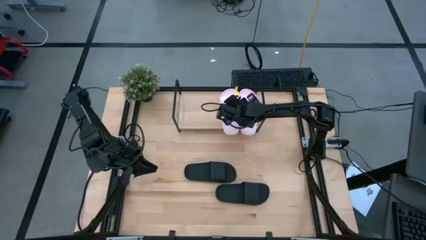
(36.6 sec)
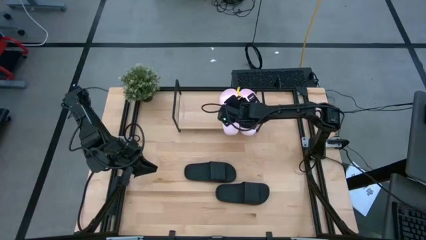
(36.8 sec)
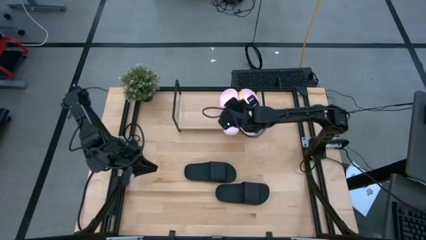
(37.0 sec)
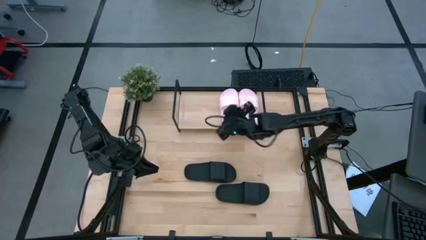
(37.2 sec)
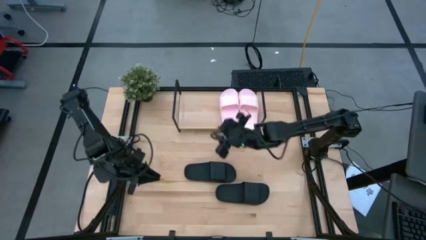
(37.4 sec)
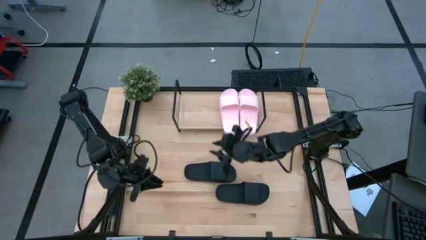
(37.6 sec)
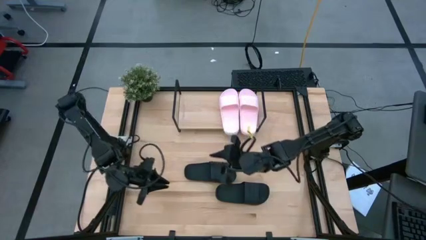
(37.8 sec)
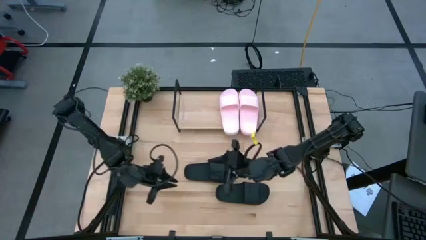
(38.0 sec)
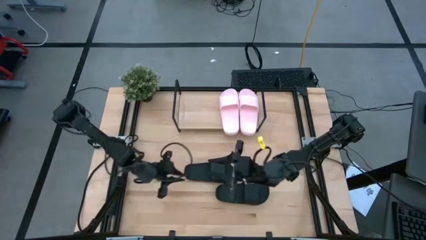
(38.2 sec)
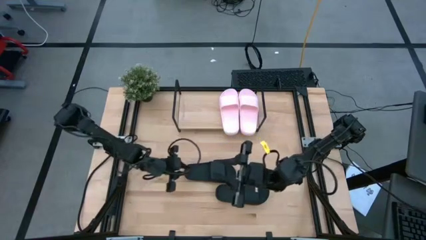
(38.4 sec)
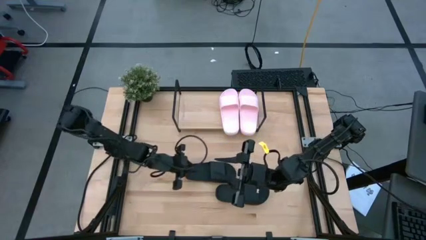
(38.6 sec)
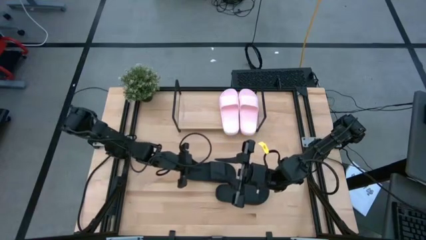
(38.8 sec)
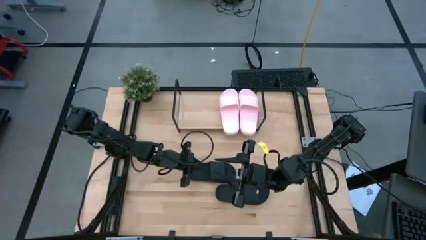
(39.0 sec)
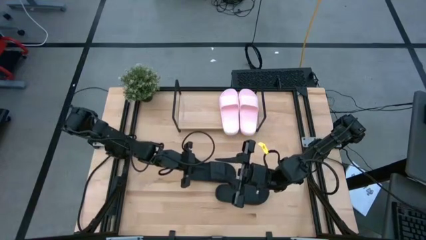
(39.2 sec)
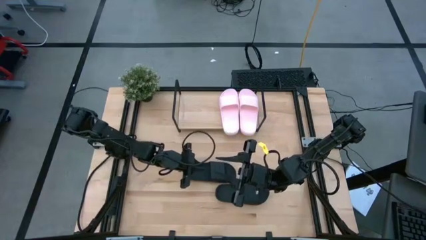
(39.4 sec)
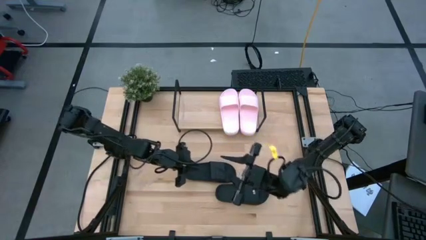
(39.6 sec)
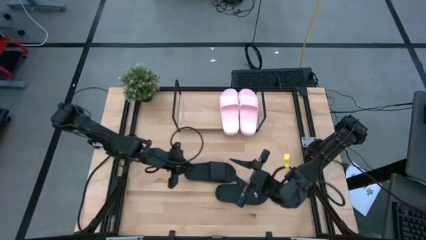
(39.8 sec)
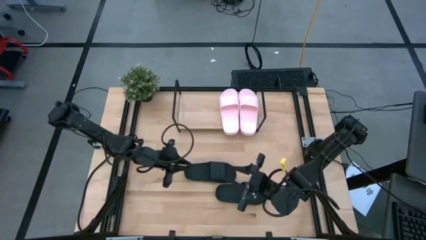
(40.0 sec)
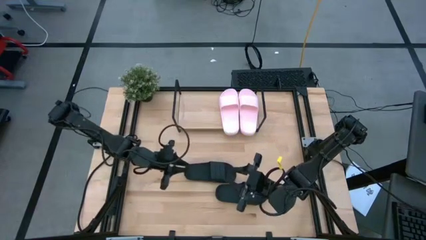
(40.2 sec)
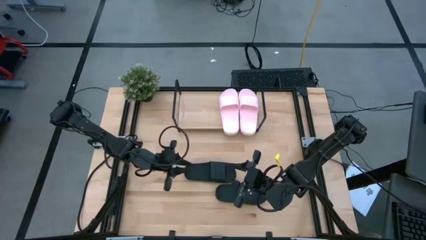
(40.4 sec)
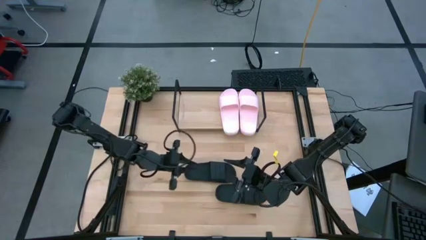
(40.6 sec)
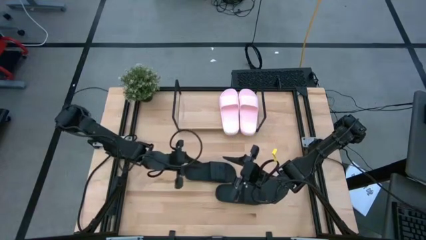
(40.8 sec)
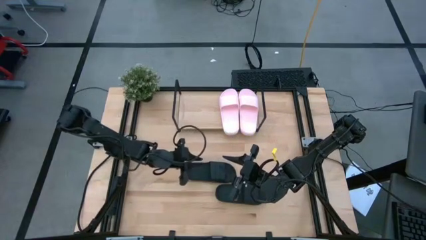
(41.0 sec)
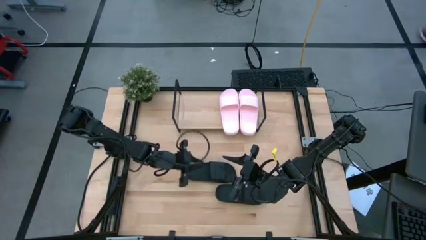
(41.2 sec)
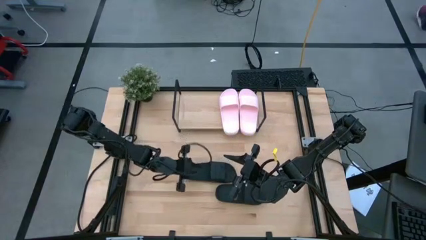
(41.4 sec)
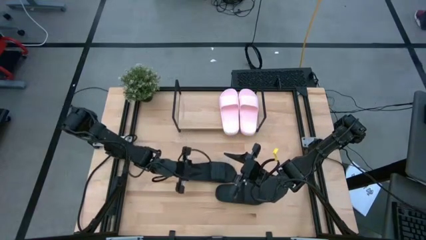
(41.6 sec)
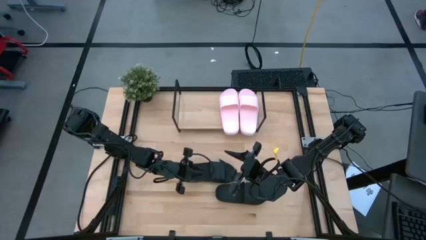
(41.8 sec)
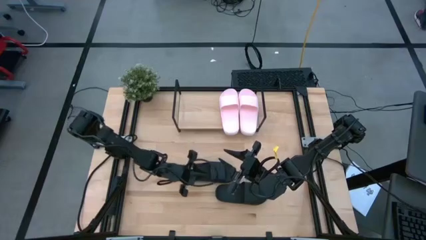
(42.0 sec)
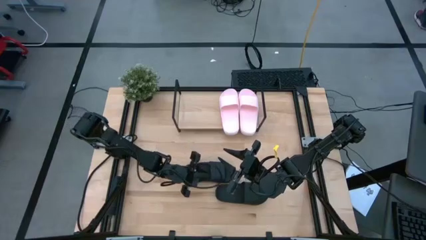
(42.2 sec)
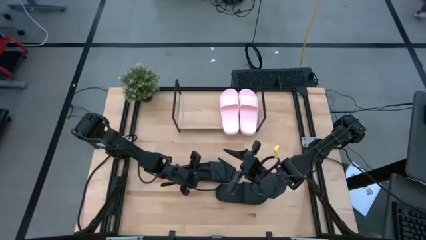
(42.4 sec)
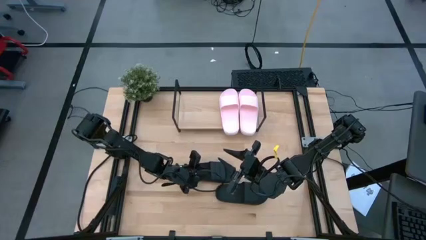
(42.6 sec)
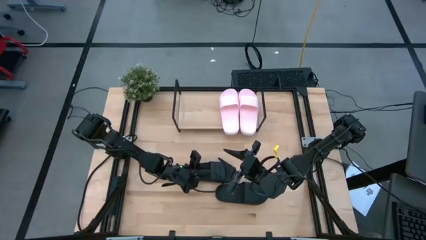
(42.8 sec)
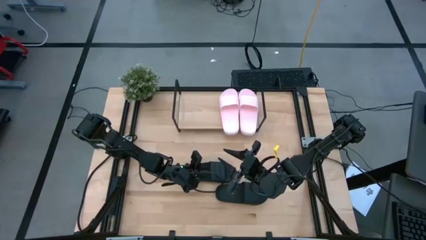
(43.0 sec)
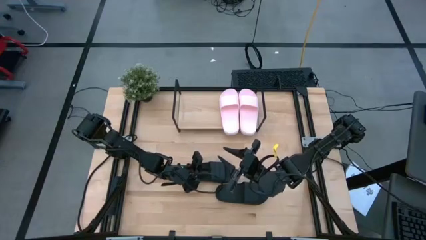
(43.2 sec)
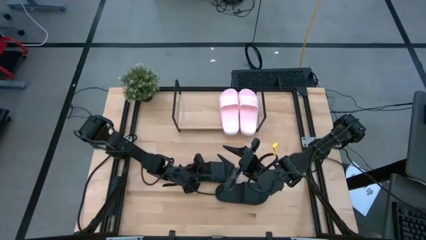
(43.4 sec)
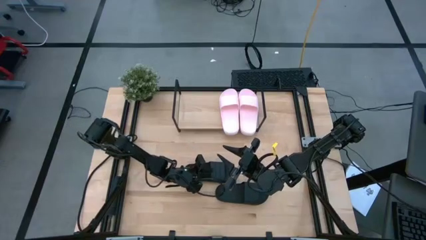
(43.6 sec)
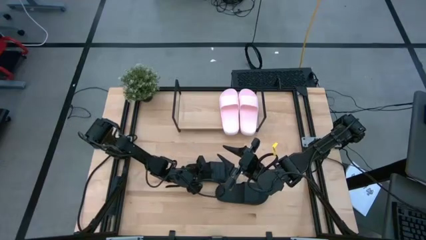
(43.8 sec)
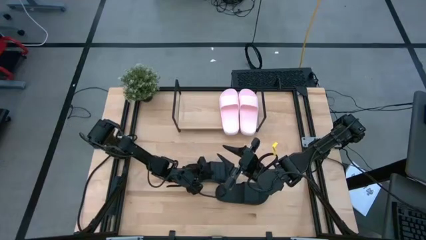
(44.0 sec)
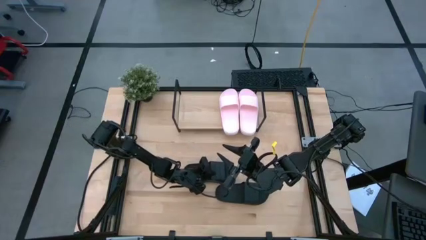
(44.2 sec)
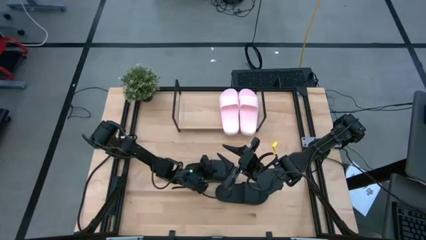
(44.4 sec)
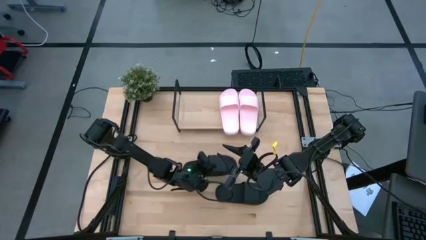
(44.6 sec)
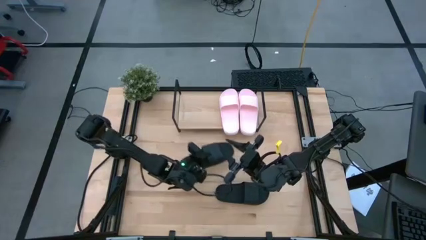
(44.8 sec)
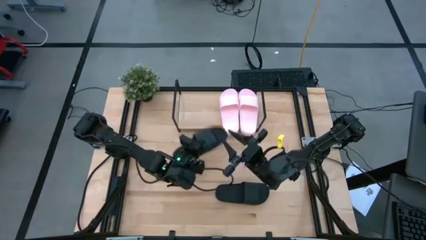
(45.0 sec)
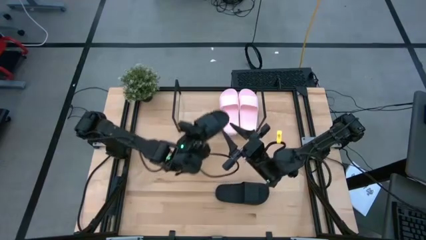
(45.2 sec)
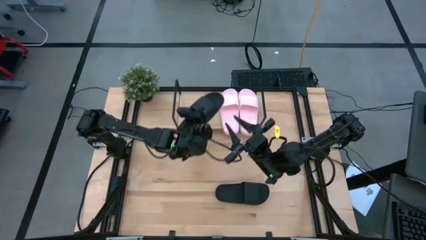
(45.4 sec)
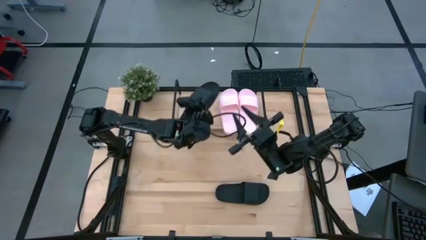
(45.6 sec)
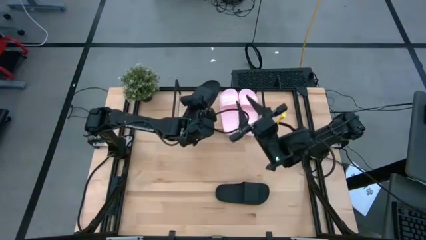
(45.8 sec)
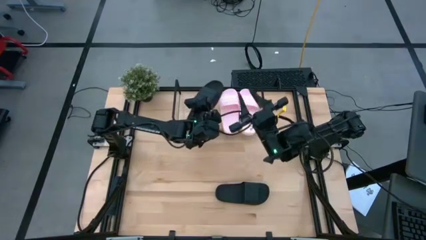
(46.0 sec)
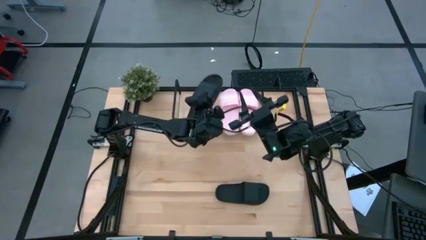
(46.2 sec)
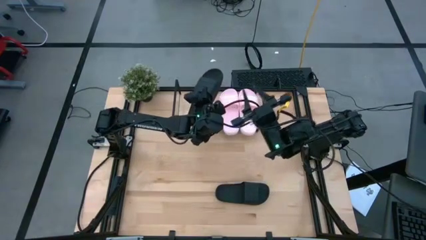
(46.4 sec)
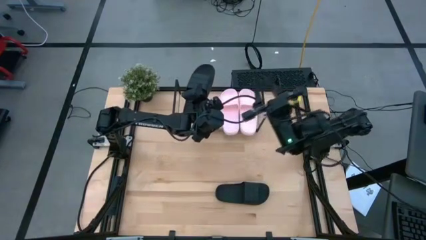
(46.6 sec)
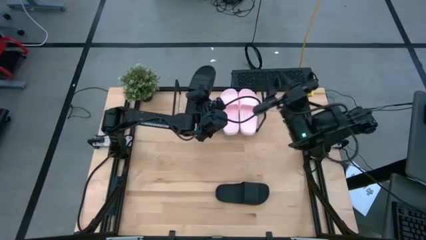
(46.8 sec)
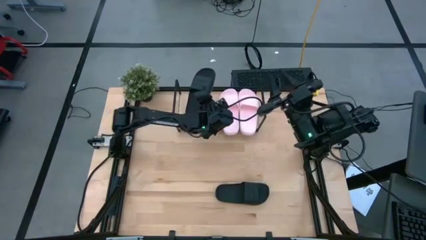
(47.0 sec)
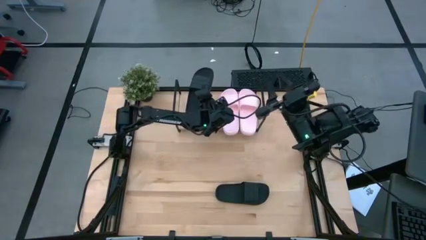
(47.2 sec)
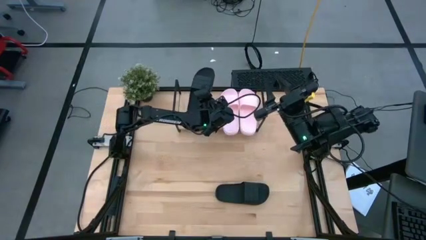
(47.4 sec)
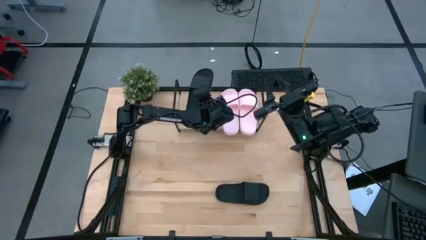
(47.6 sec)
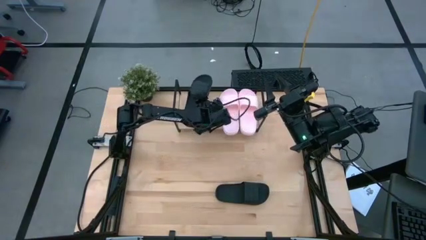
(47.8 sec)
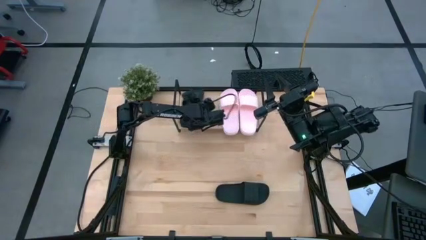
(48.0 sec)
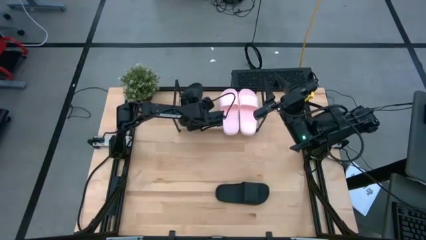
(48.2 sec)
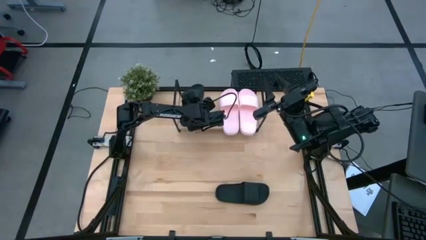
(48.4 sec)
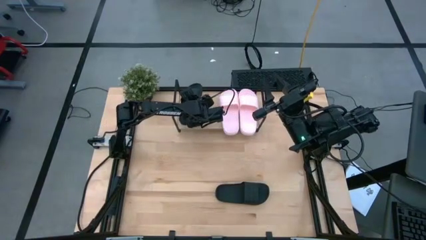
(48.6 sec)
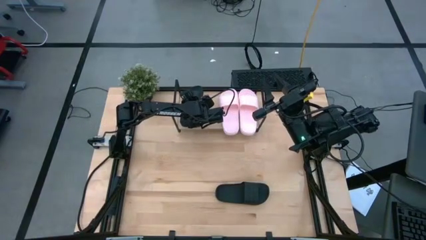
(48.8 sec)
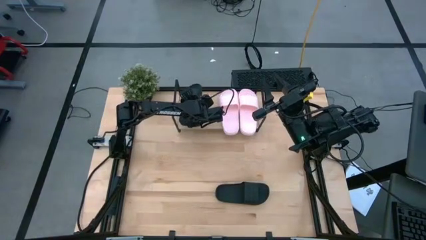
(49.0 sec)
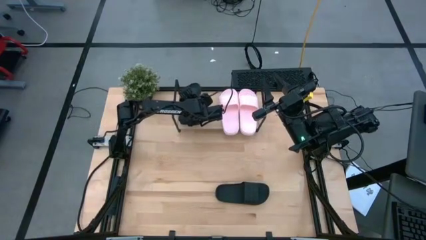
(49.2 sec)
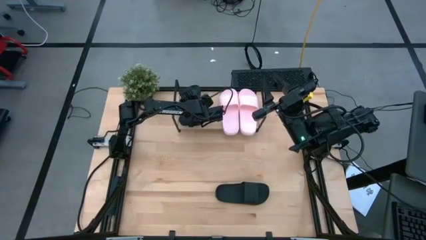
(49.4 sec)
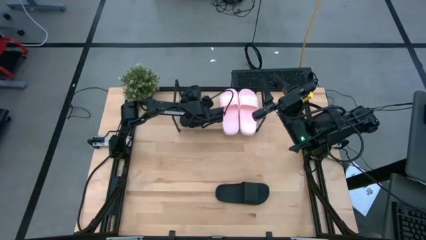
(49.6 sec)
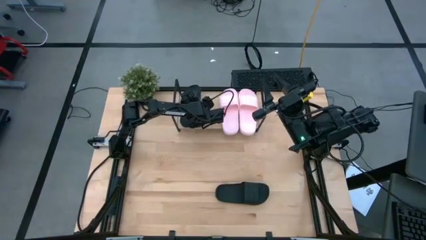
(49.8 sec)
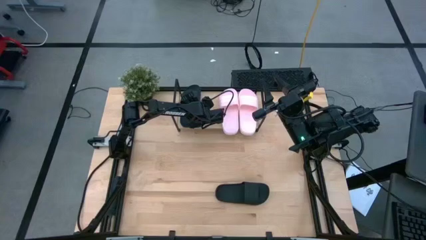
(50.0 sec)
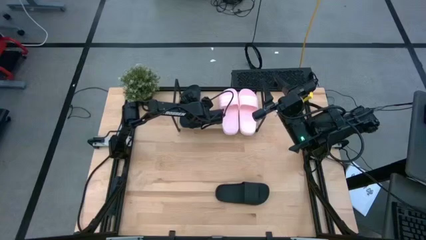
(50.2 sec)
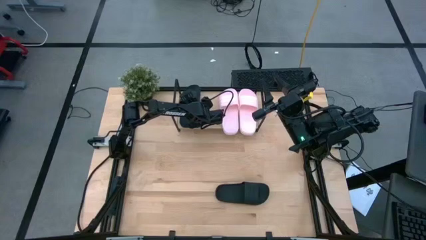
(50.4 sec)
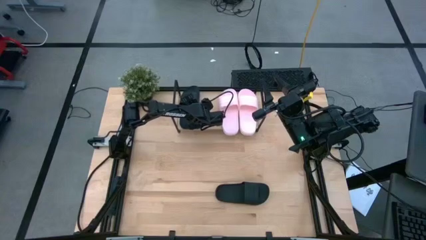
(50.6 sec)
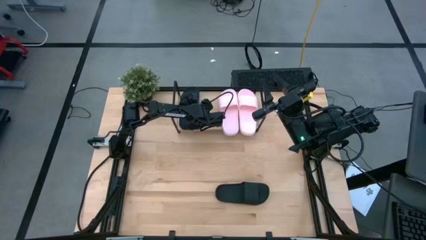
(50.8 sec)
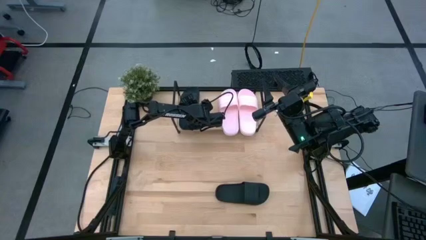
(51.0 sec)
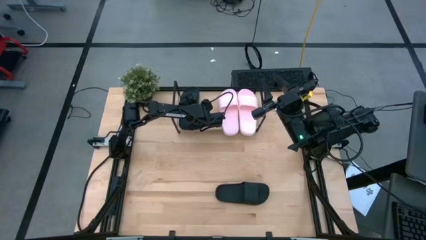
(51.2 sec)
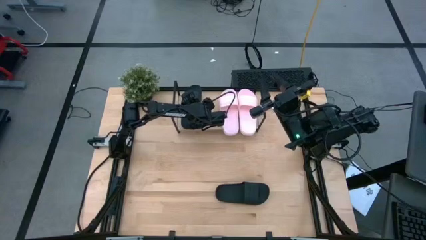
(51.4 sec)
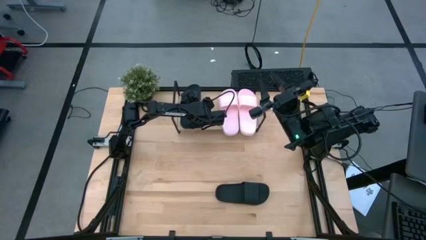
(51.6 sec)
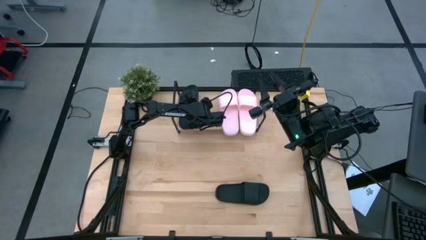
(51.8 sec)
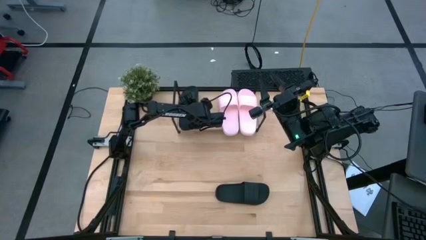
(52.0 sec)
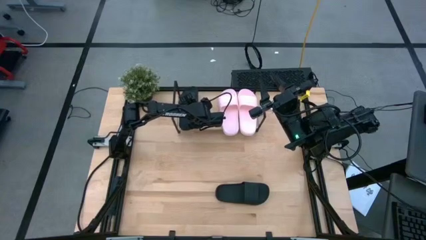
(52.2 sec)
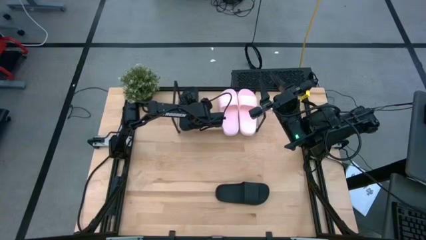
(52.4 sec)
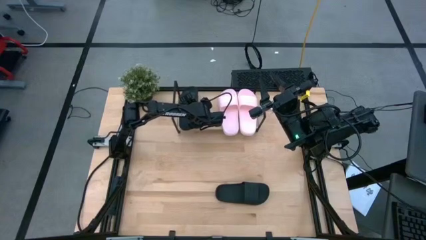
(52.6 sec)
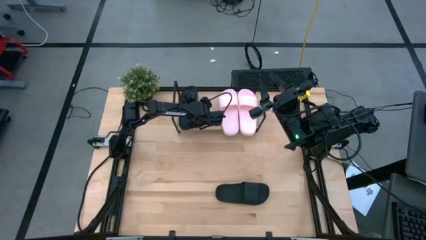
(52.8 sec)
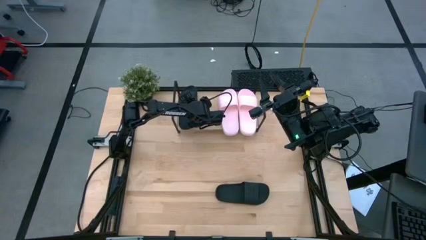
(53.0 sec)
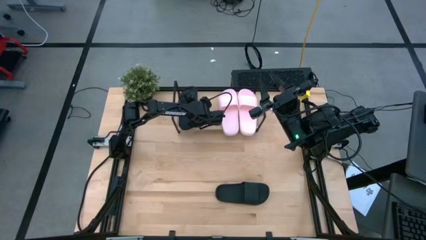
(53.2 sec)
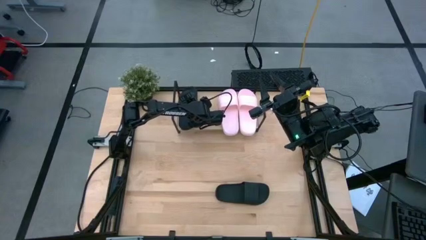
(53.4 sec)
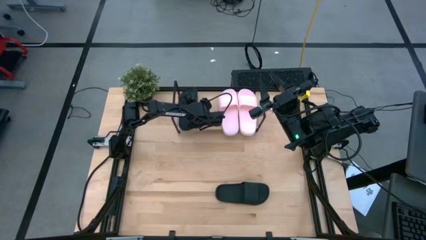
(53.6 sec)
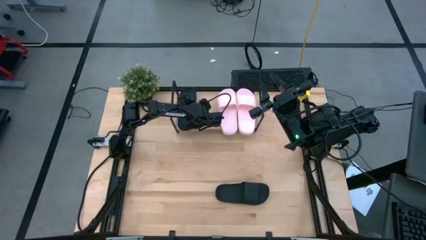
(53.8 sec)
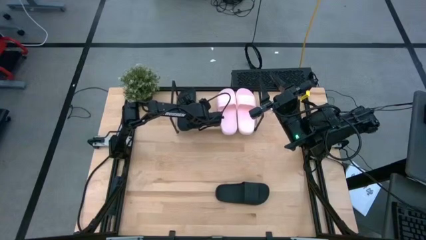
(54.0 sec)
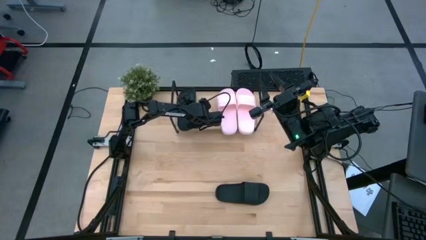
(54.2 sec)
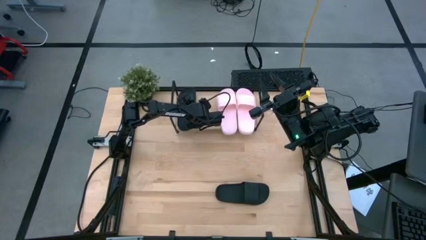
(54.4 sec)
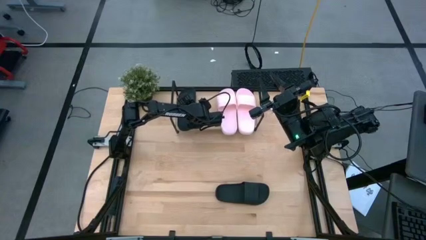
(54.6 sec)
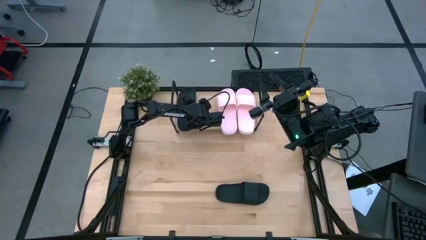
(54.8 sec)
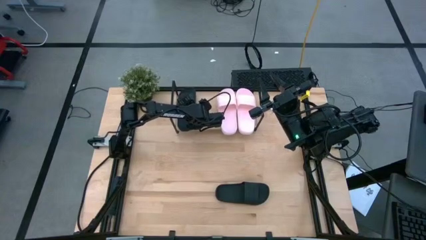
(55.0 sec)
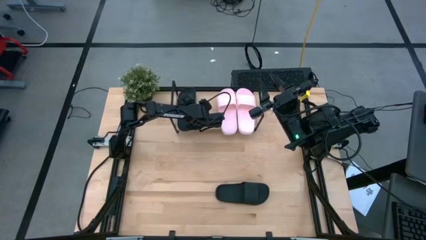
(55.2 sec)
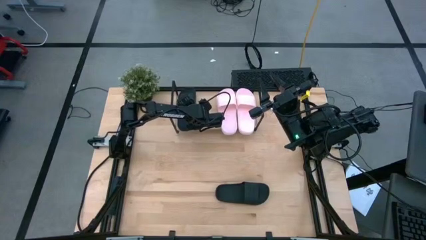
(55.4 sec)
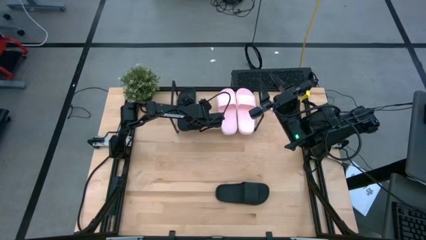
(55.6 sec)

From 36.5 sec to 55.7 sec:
Task: Pick and place slides into the shelf
Put the top black slide on the shelf
